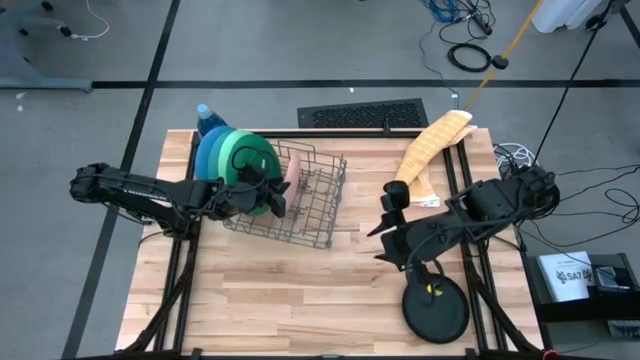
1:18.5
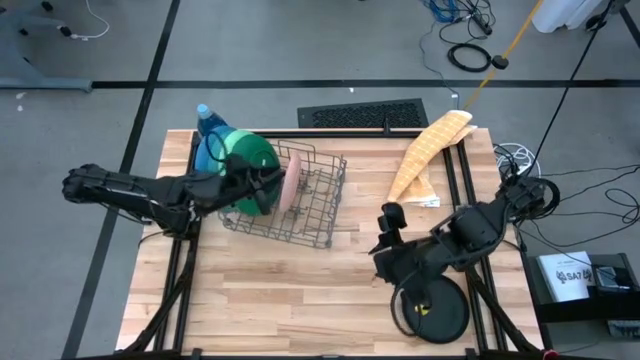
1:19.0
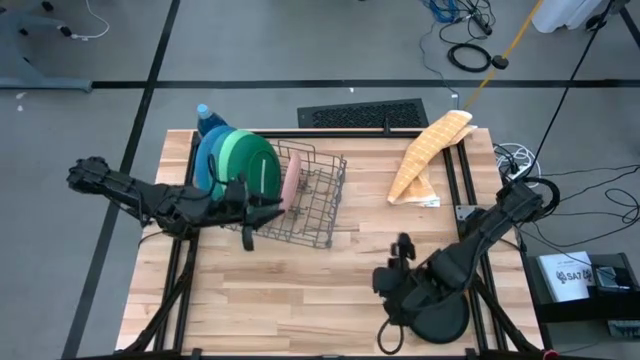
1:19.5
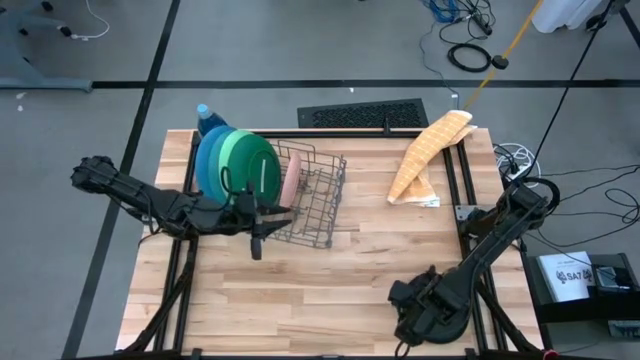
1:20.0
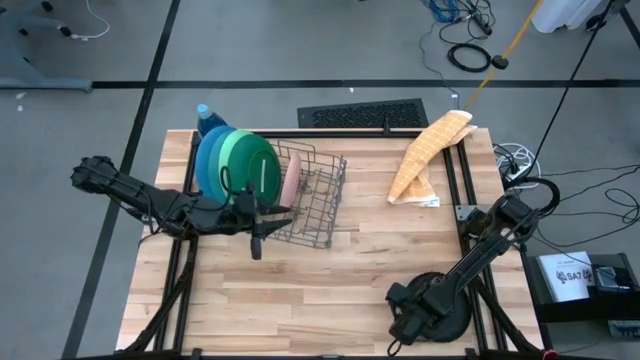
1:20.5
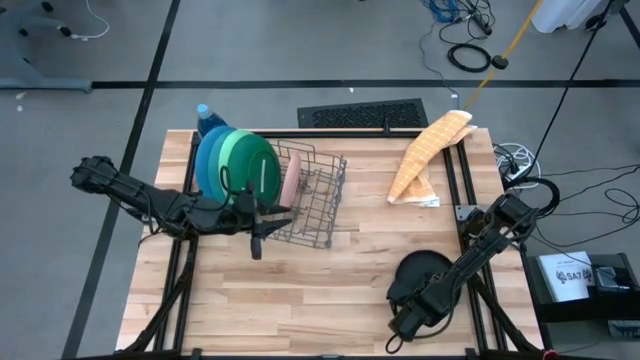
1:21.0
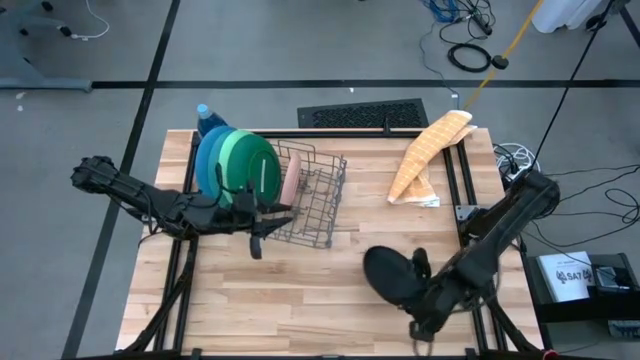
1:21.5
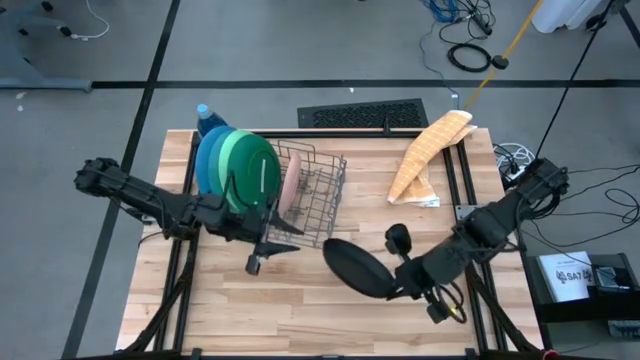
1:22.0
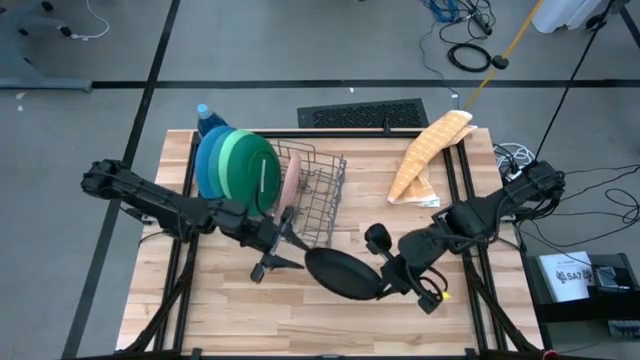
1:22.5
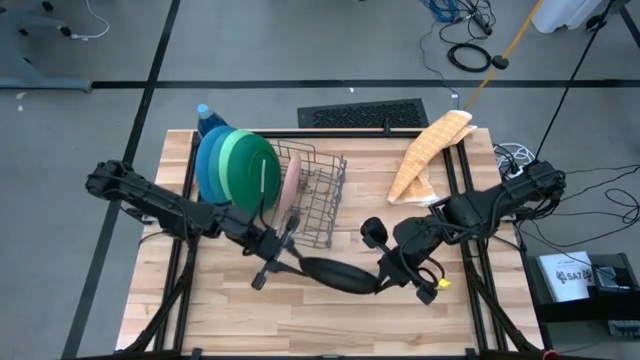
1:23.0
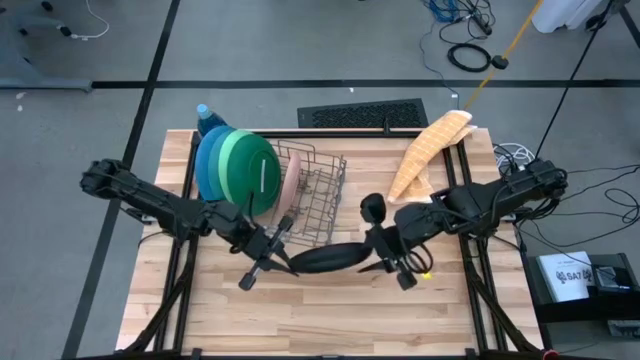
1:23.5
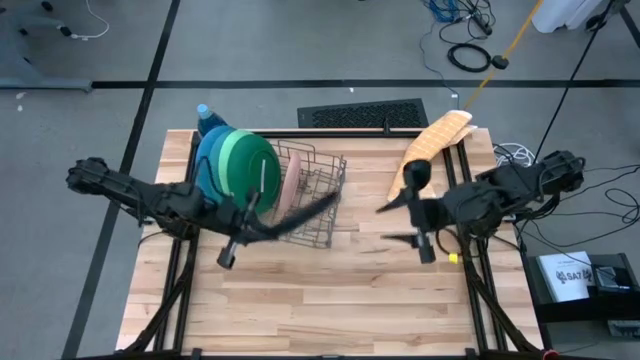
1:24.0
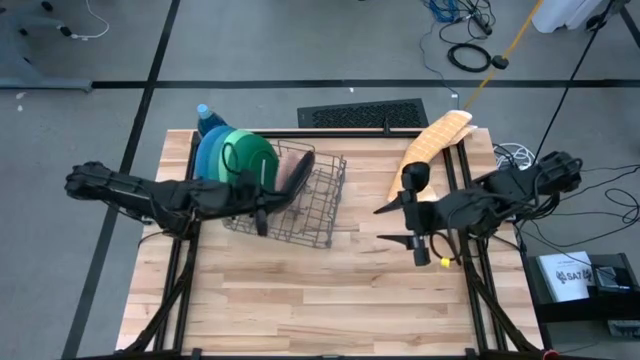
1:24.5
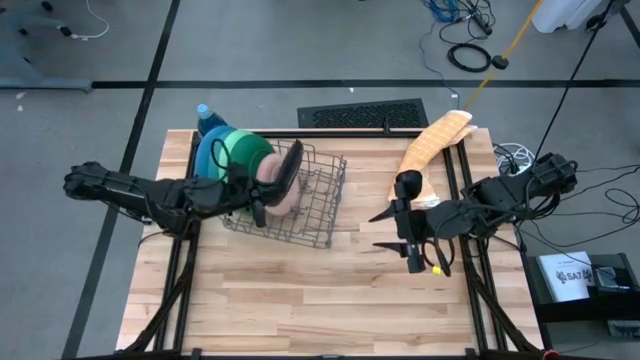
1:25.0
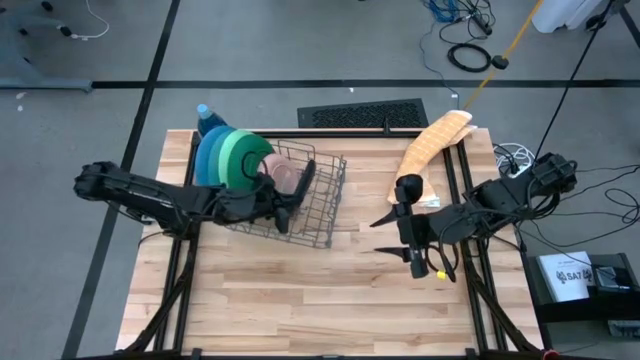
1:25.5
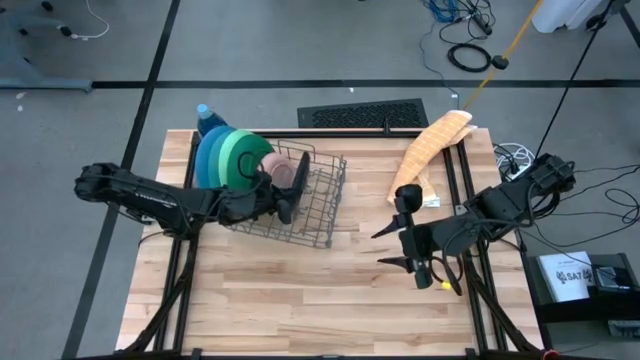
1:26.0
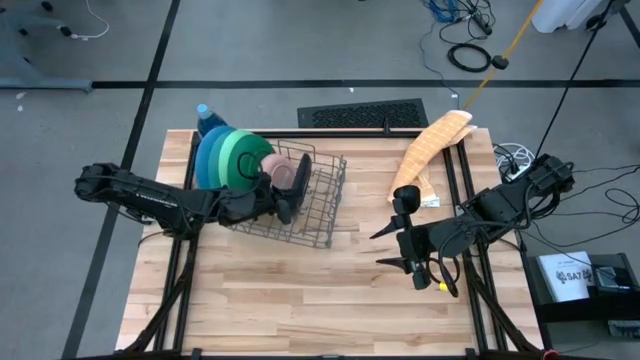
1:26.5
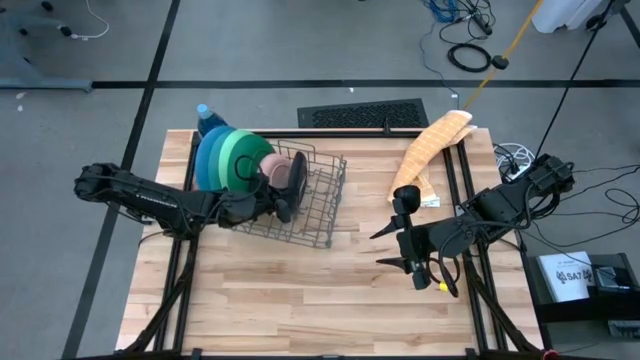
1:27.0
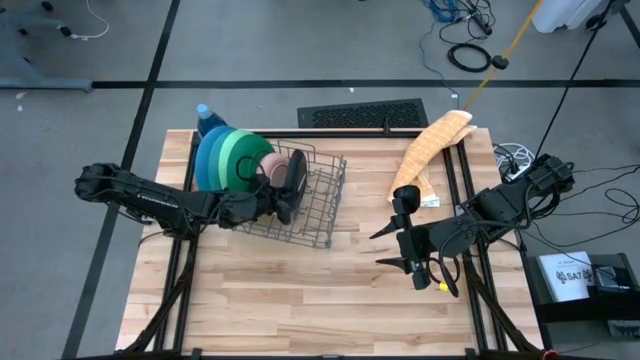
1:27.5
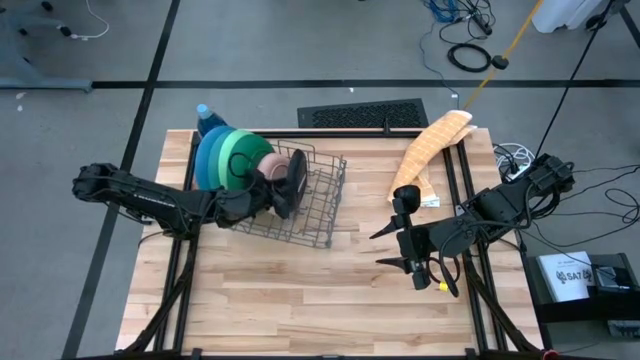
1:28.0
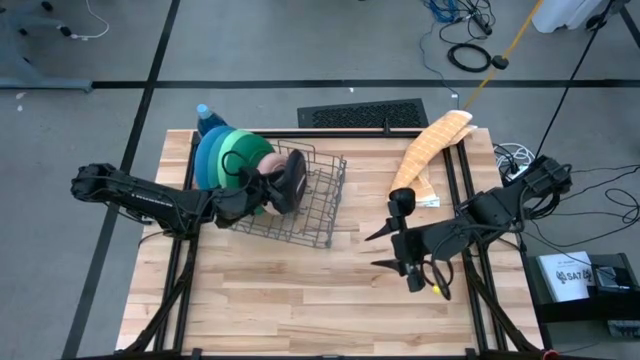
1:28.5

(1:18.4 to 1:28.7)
Task: Sort dishes
Put the black plate into the dish rack

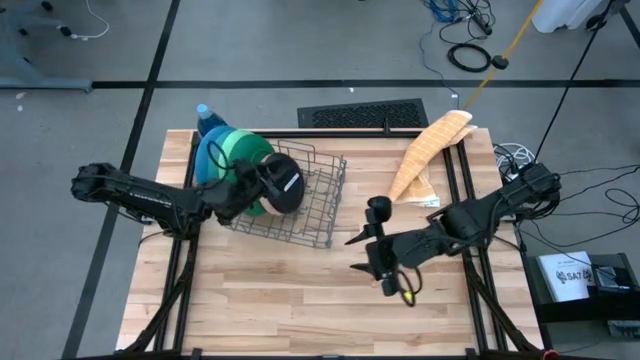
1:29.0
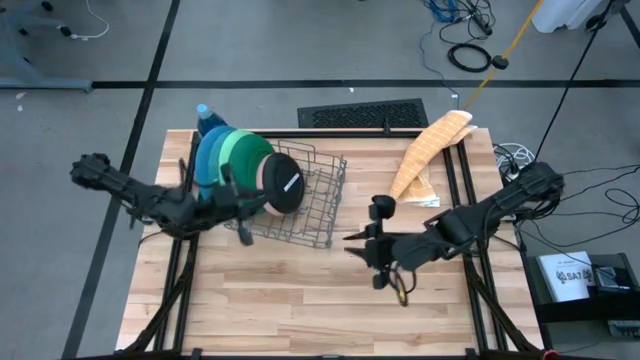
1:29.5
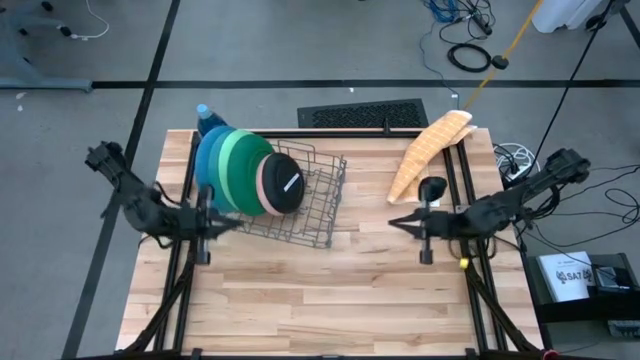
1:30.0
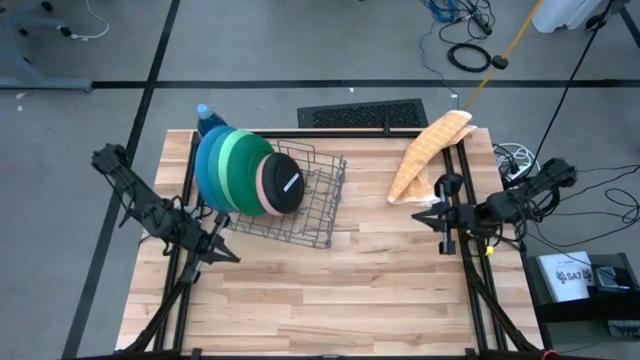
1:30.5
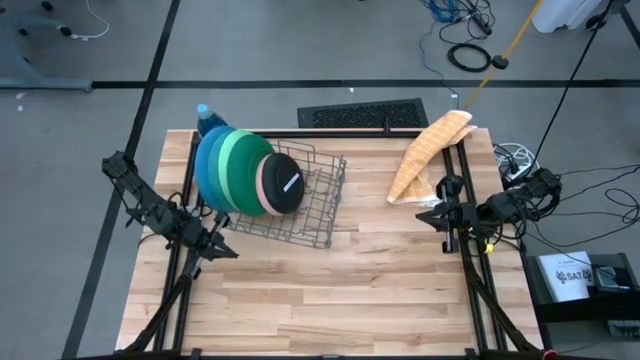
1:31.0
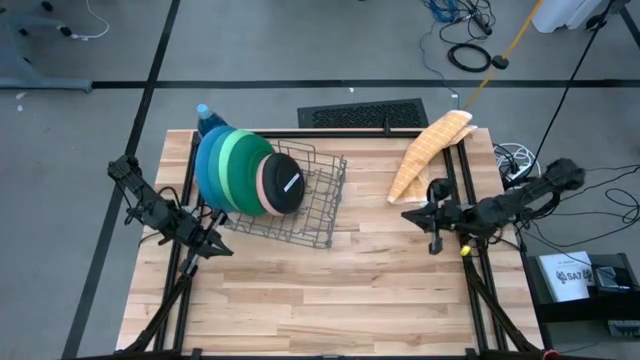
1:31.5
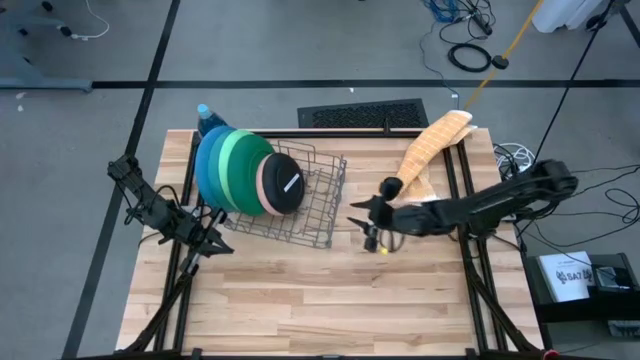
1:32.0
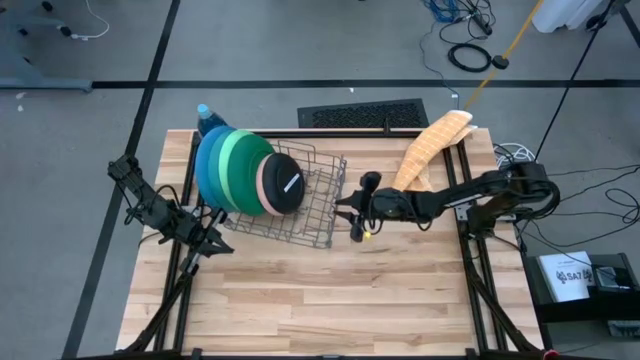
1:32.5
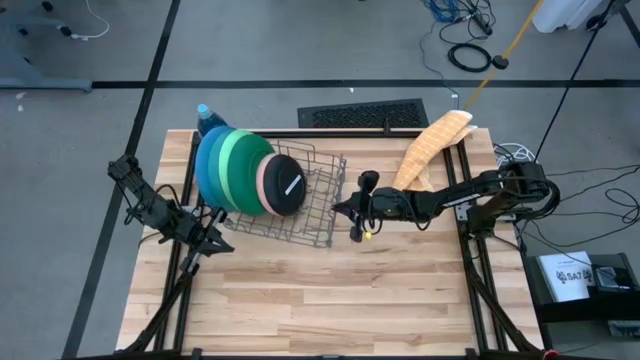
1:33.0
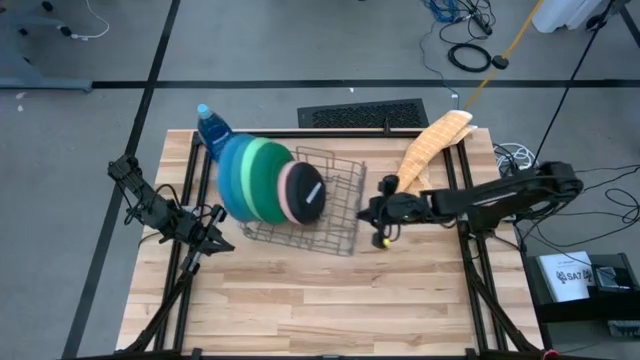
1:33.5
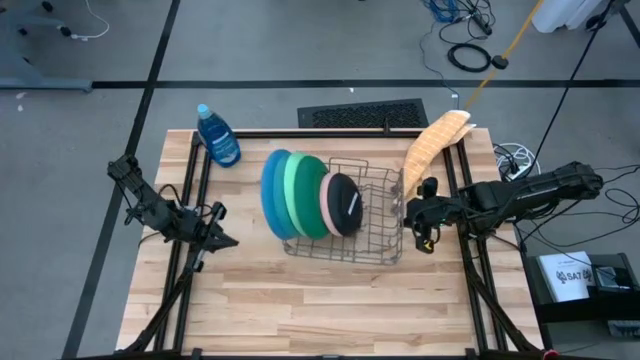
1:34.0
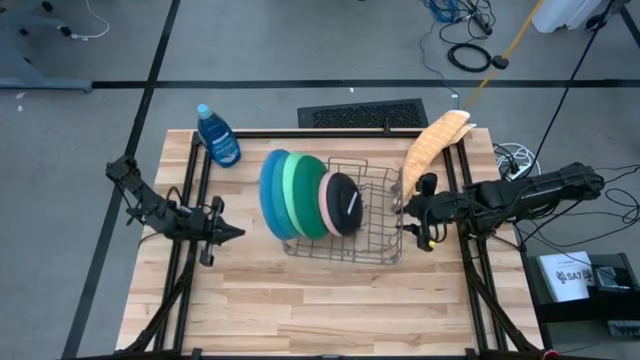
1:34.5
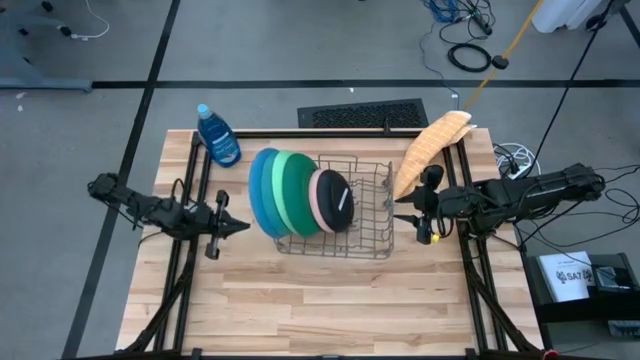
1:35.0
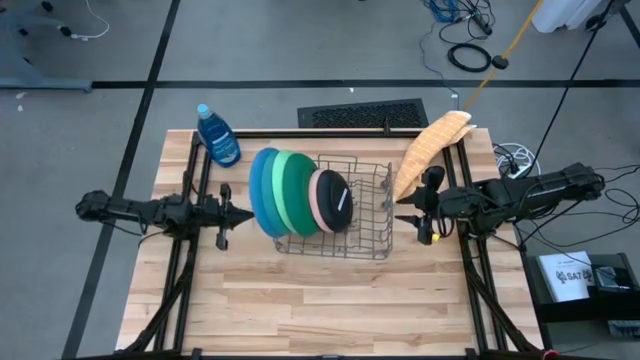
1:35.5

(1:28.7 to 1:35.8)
Adjust the dishwasher to the center of the table

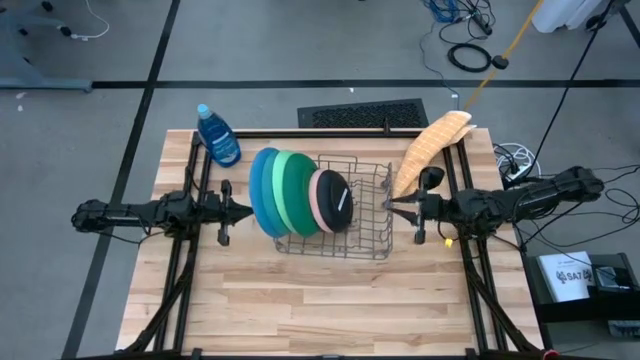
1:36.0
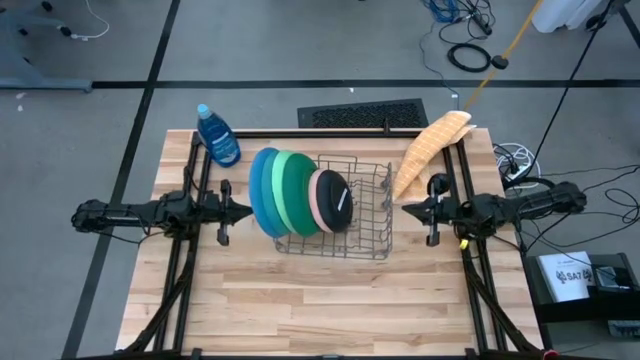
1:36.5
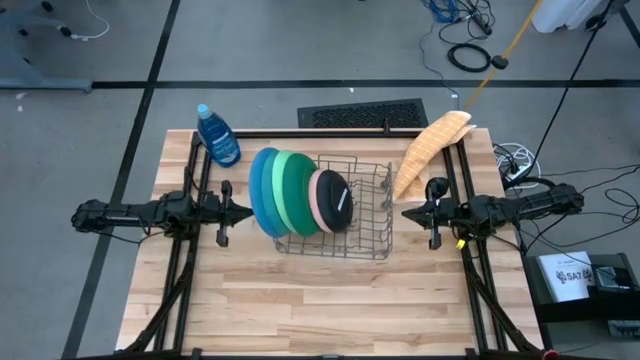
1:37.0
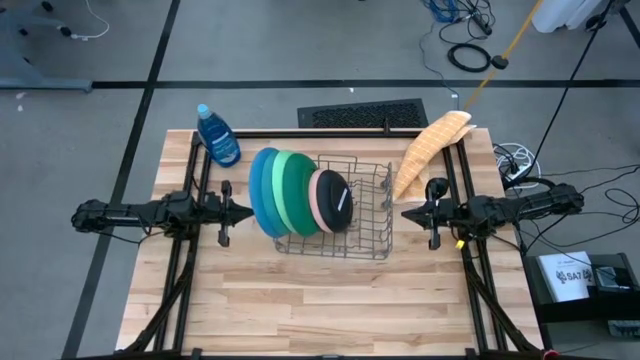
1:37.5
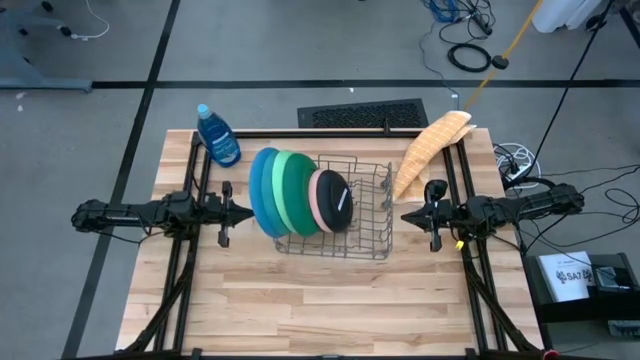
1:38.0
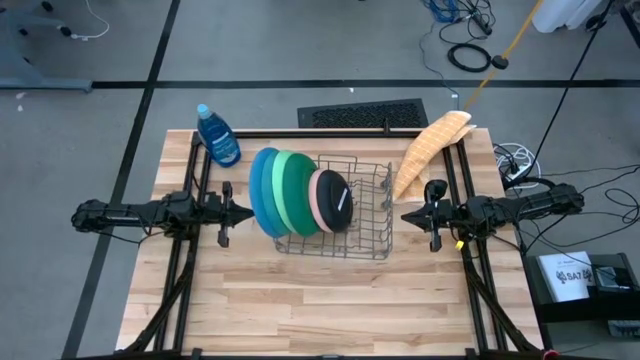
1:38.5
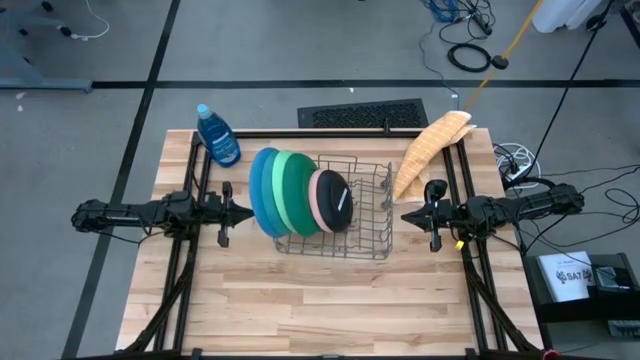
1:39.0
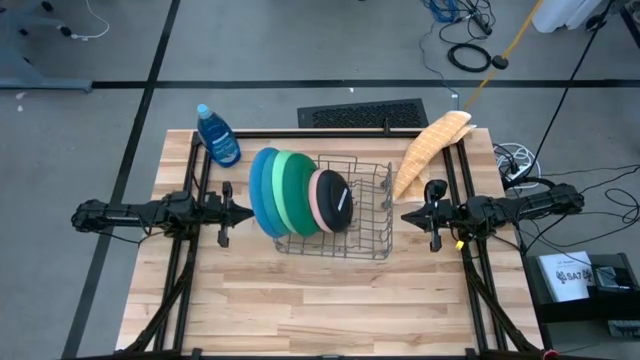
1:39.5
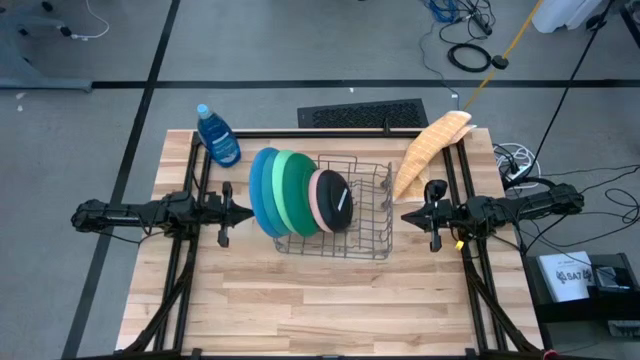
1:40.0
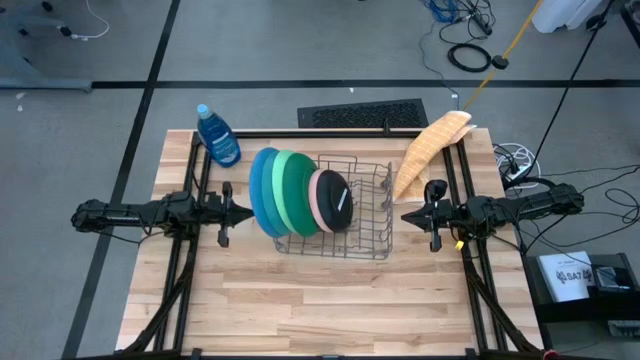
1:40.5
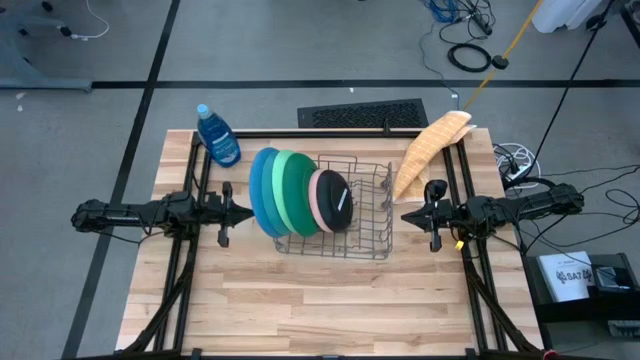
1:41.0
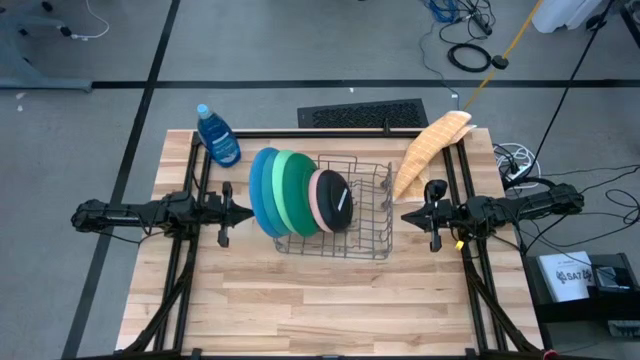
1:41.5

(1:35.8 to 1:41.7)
Return to Home Position
